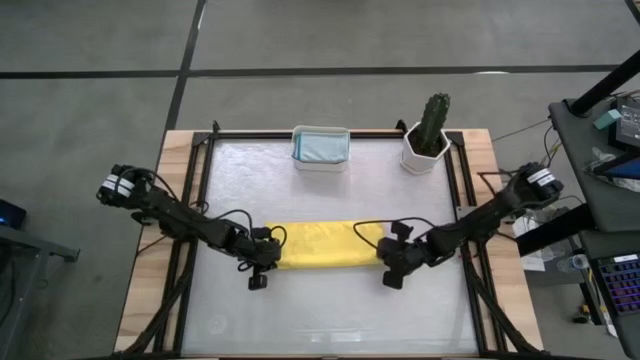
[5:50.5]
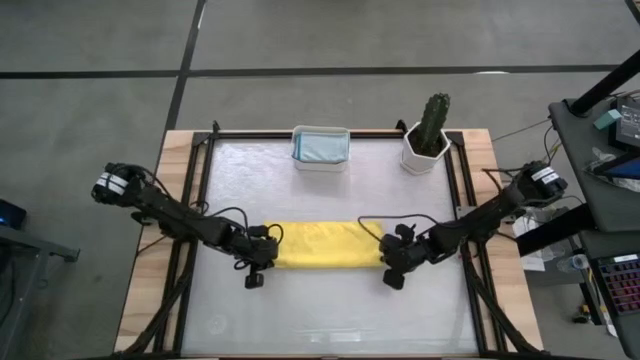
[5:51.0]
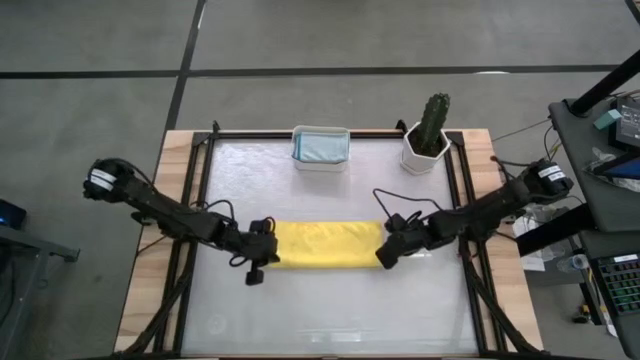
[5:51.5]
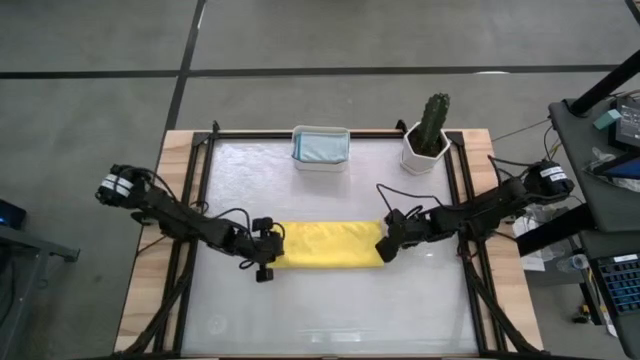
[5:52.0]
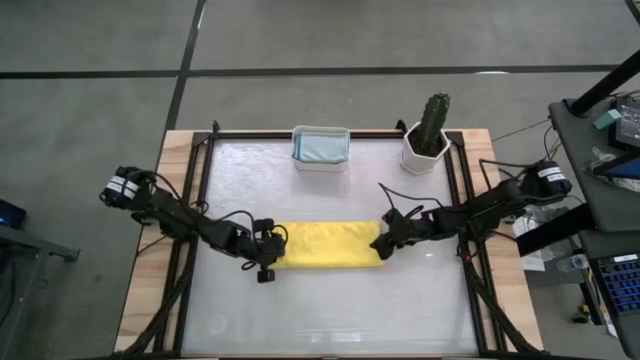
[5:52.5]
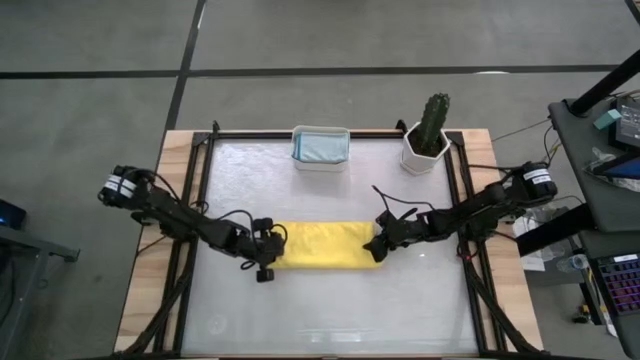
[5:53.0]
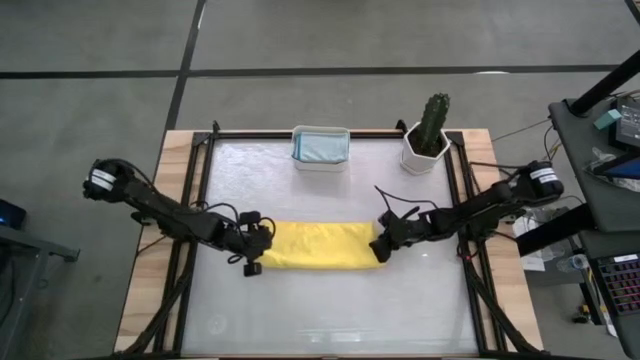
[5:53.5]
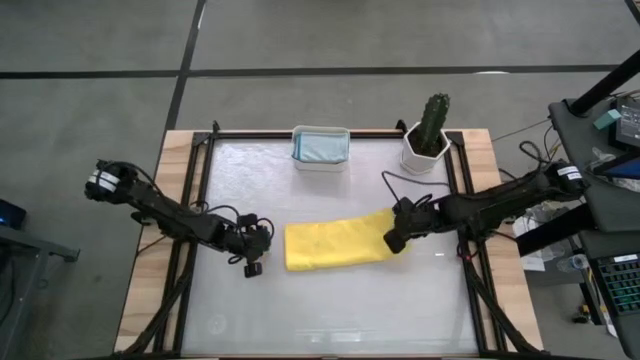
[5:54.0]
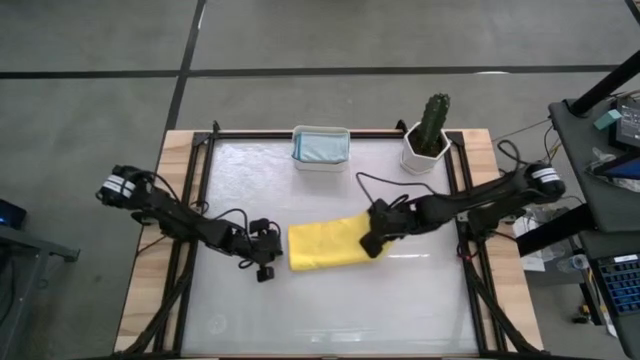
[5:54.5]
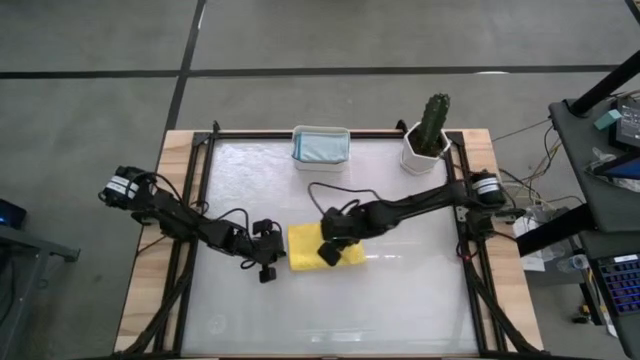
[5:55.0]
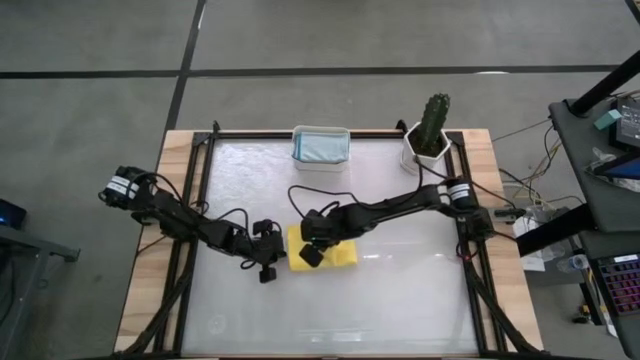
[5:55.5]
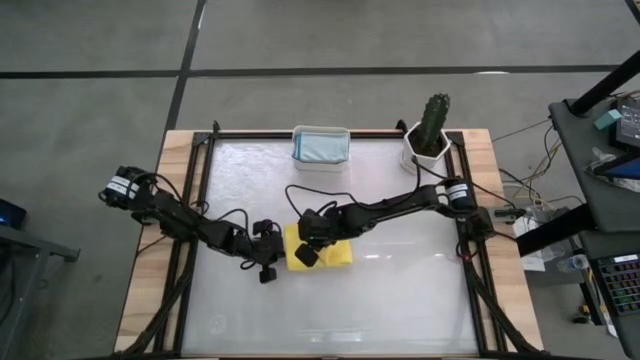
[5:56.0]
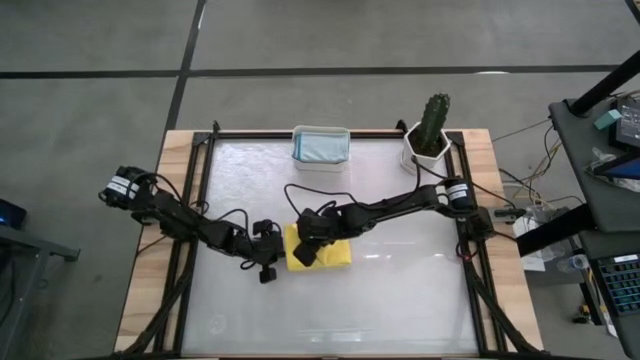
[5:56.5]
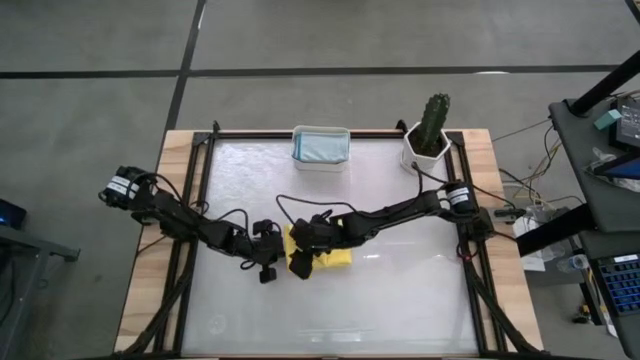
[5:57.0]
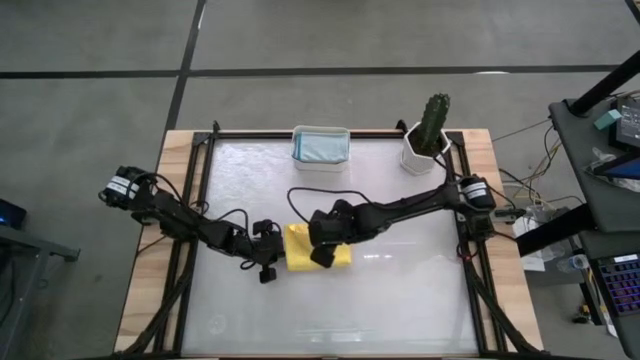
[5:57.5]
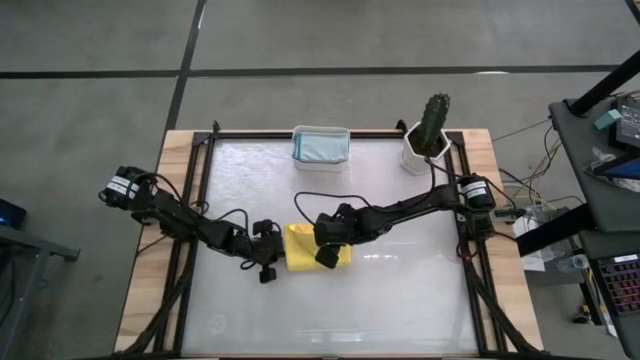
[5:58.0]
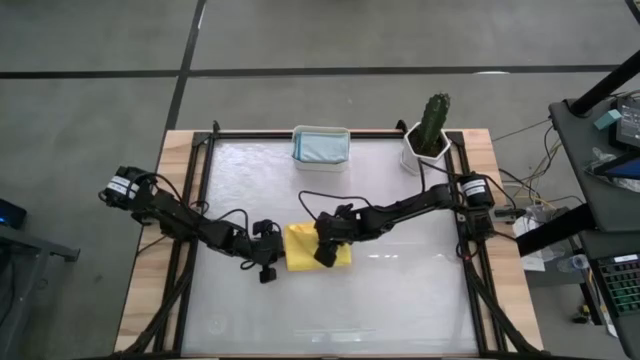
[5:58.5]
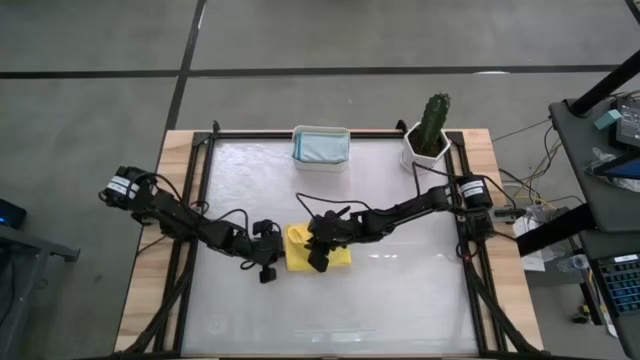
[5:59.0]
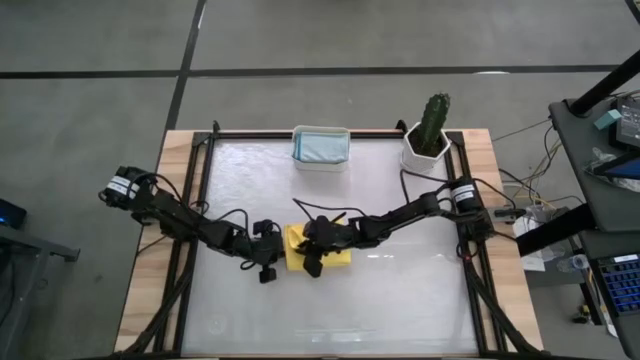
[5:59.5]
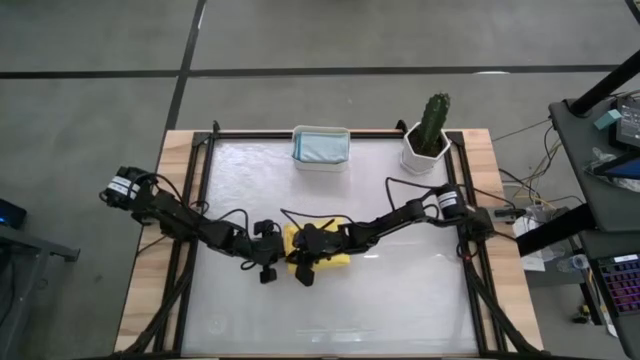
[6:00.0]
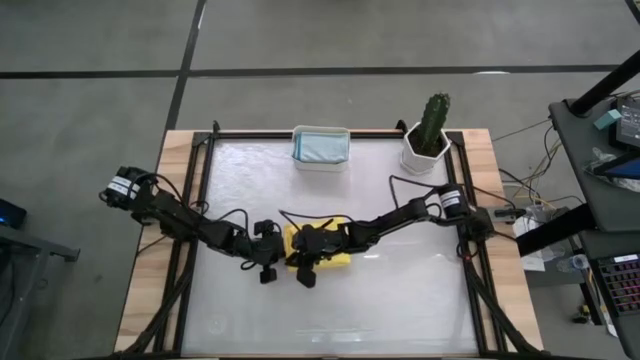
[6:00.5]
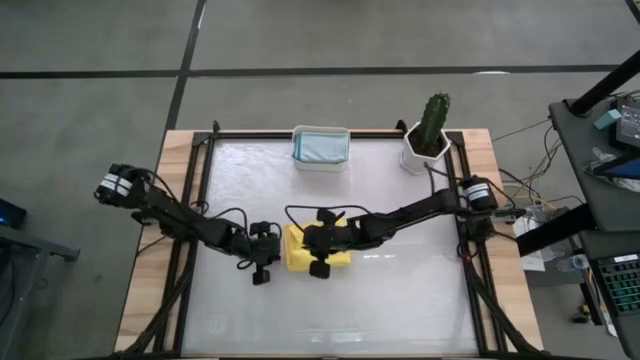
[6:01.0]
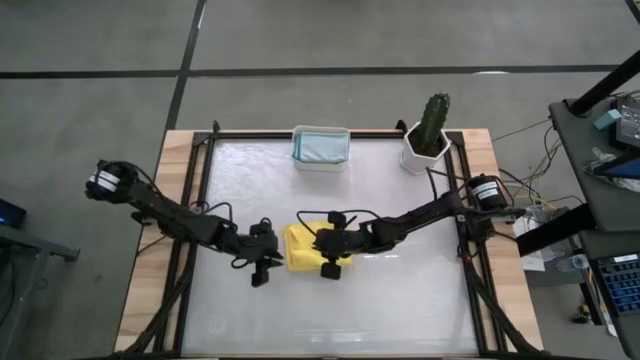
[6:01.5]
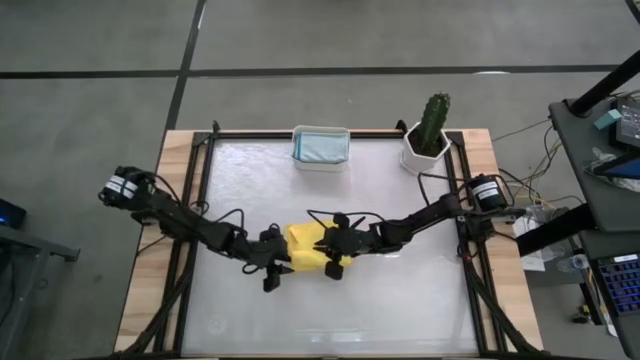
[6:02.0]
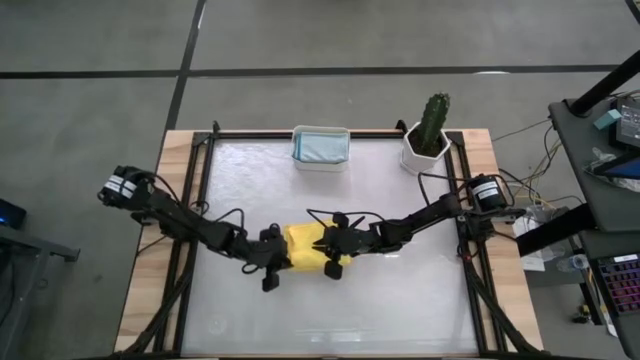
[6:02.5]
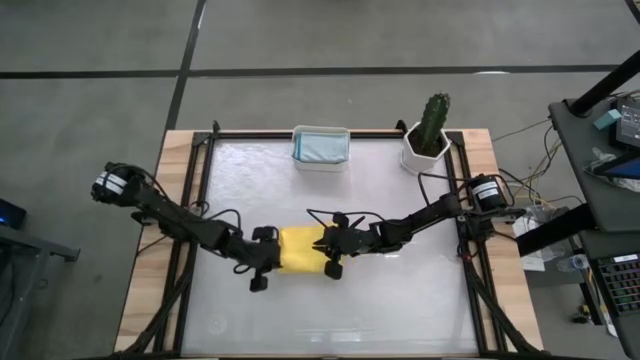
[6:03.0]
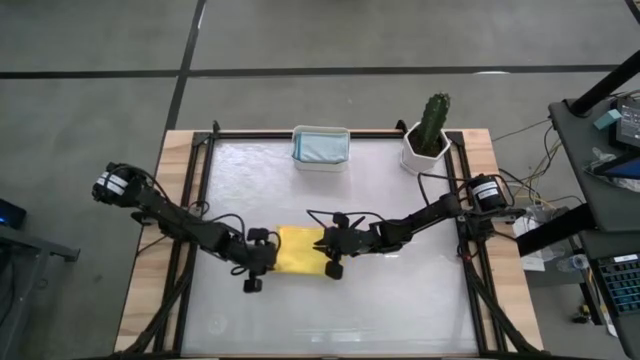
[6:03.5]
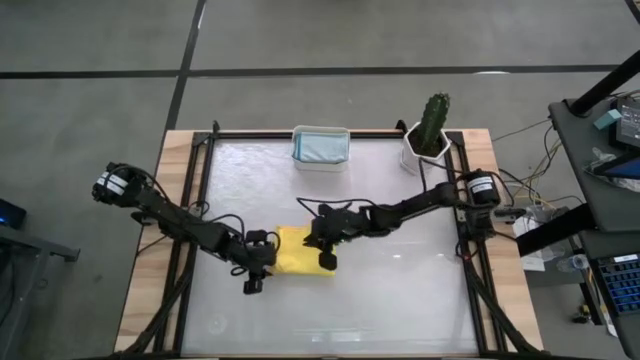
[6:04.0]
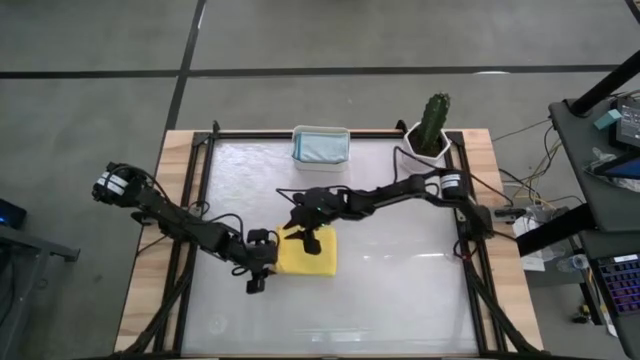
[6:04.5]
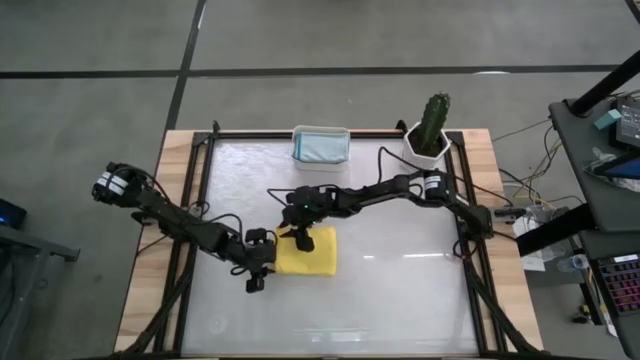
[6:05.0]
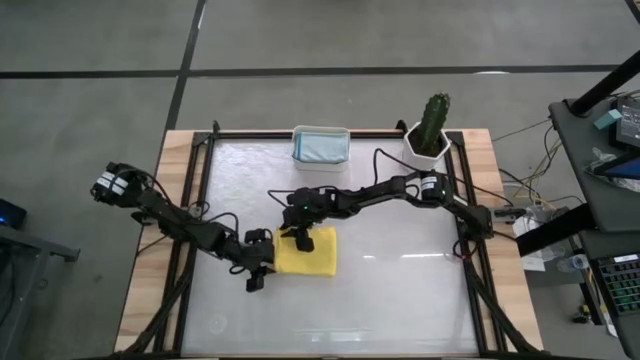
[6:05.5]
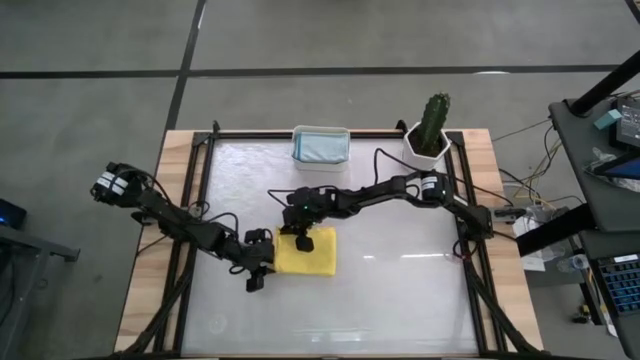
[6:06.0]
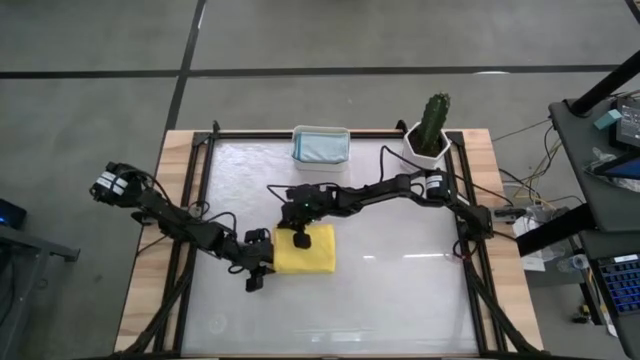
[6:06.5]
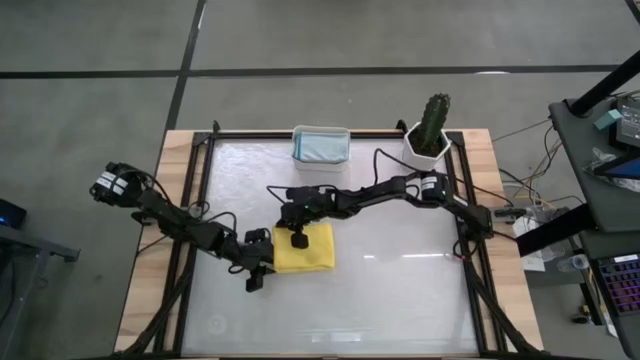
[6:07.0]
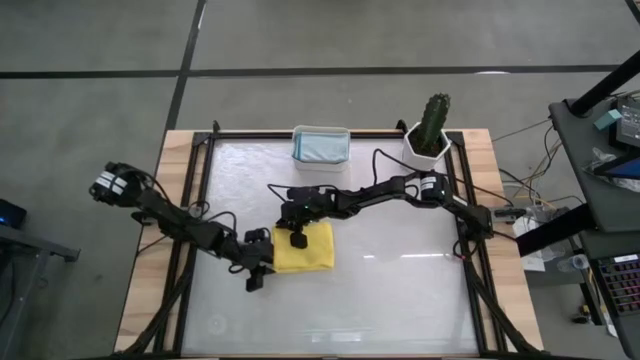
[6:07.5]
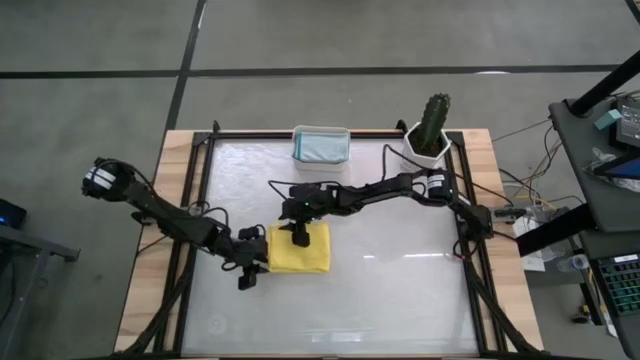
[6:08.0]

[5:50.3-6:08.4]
Task: Fold microfiber towels
Fold the yellow cloth
